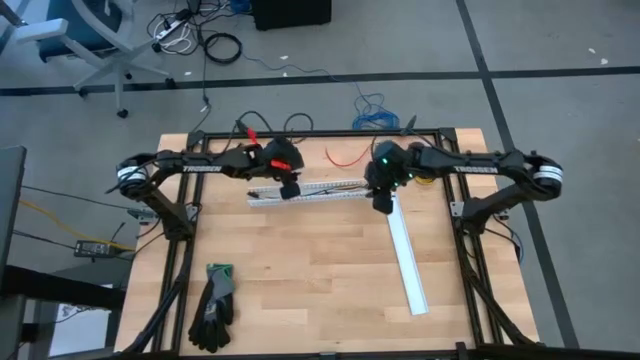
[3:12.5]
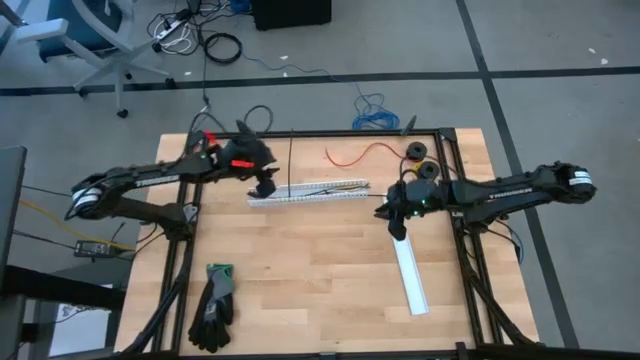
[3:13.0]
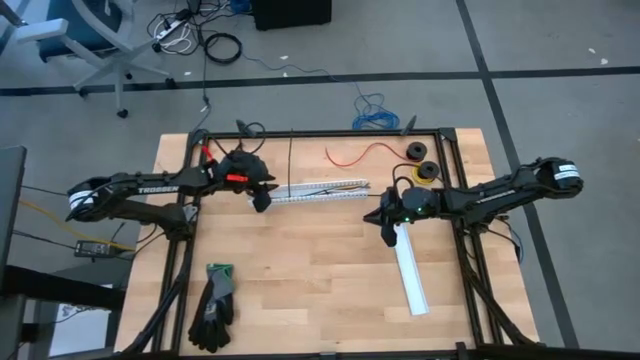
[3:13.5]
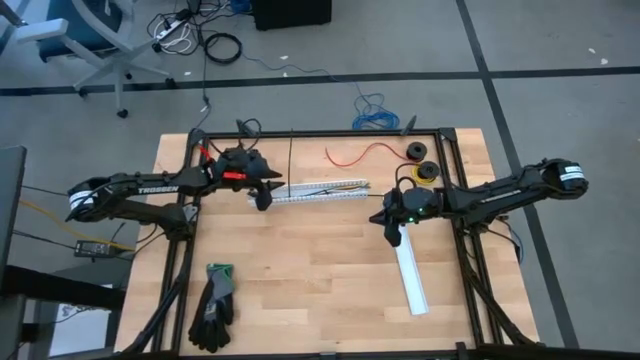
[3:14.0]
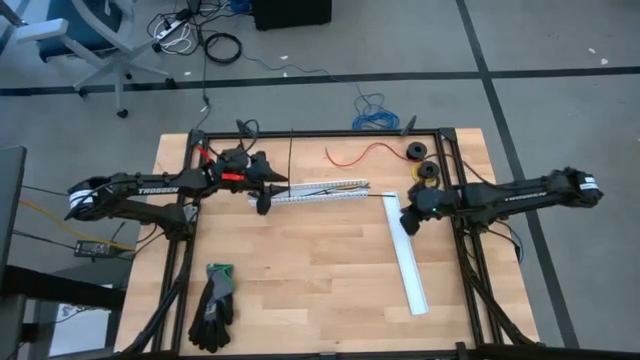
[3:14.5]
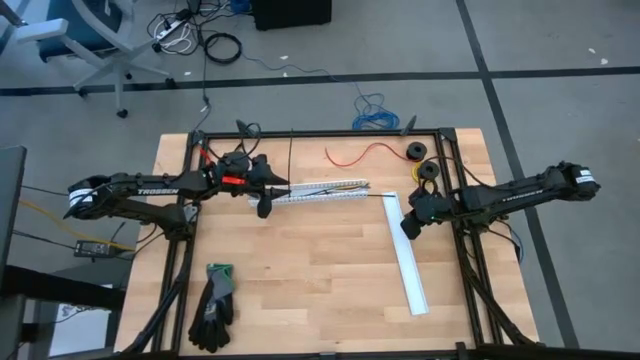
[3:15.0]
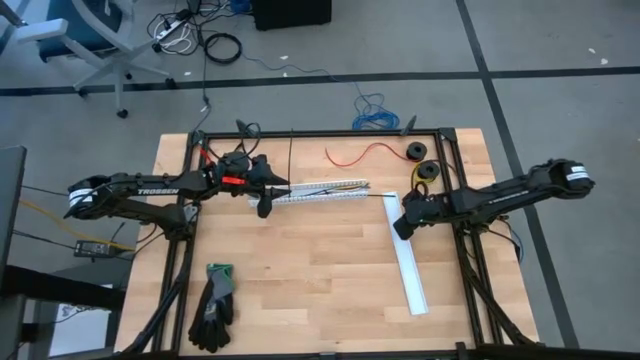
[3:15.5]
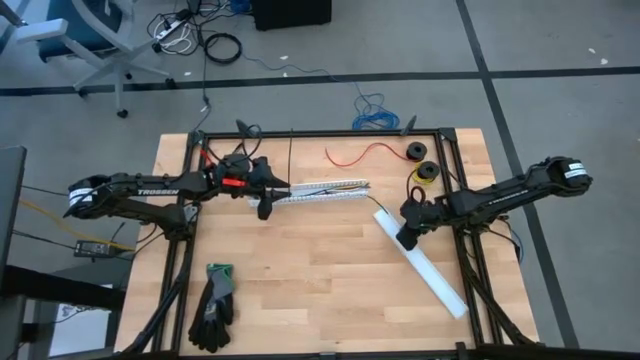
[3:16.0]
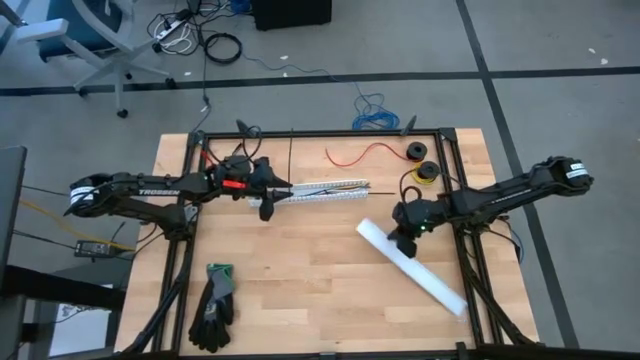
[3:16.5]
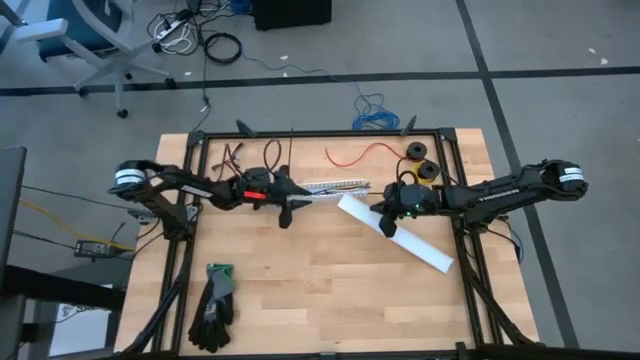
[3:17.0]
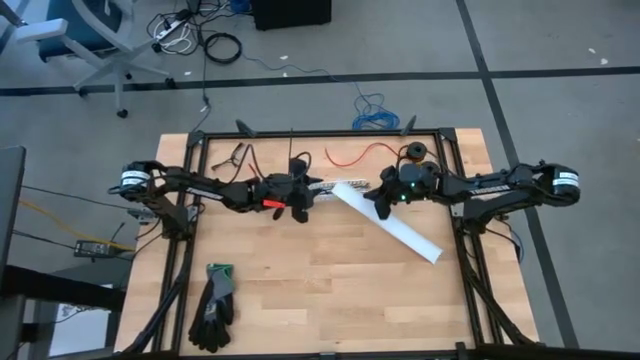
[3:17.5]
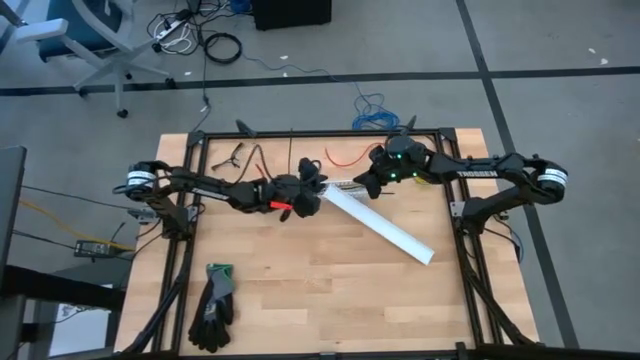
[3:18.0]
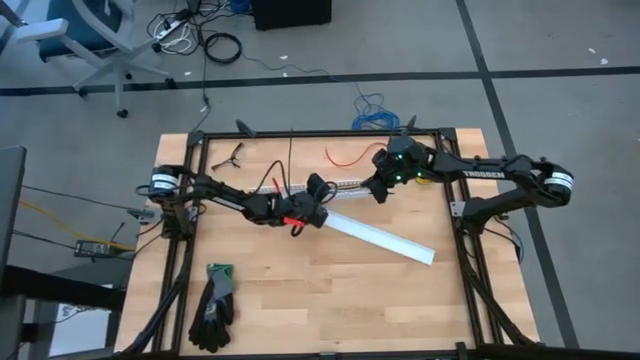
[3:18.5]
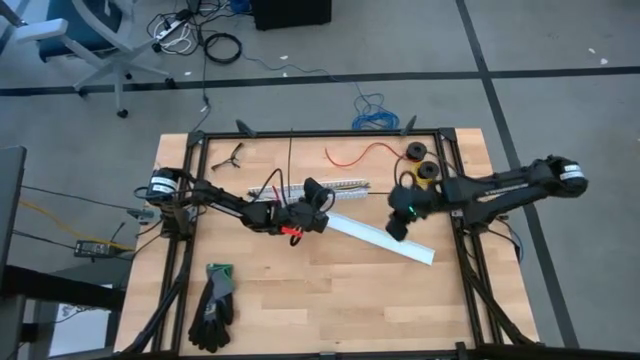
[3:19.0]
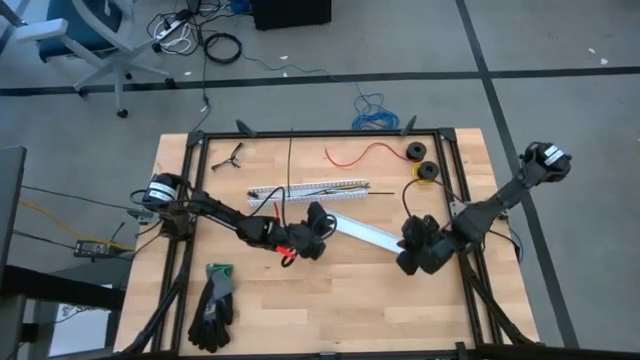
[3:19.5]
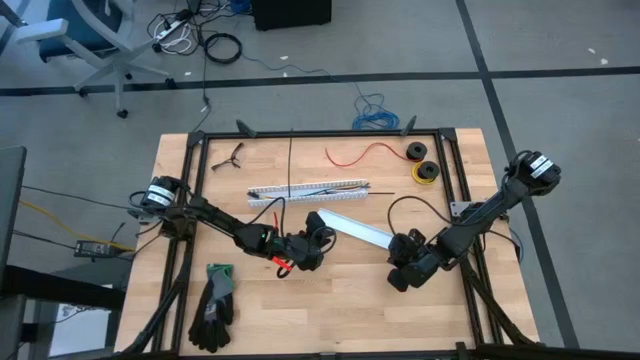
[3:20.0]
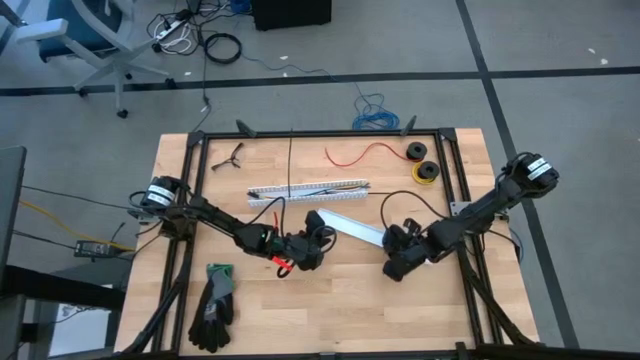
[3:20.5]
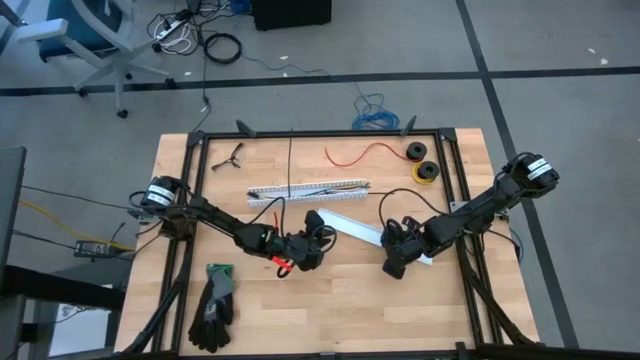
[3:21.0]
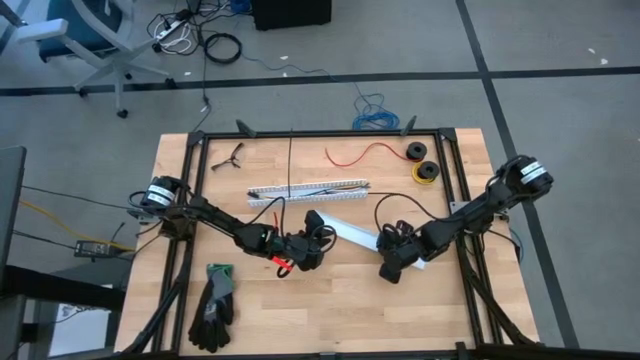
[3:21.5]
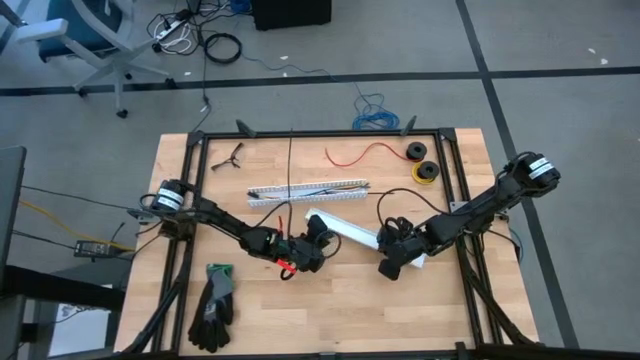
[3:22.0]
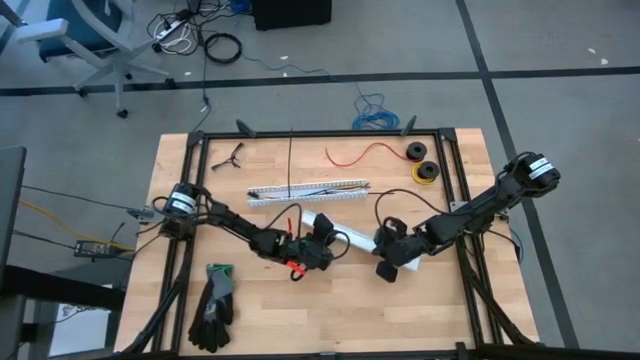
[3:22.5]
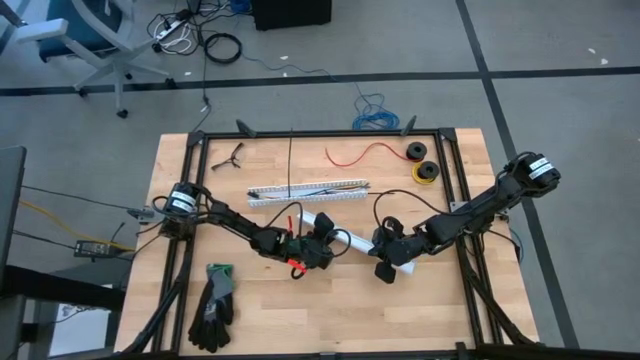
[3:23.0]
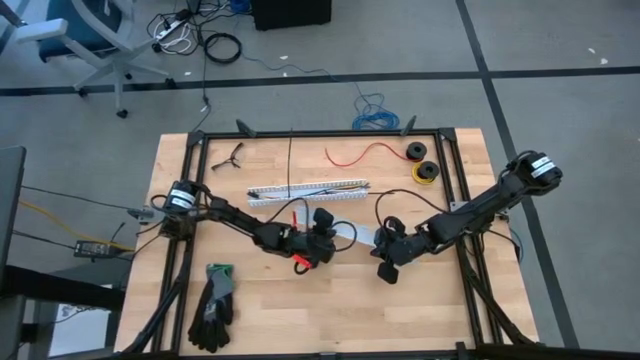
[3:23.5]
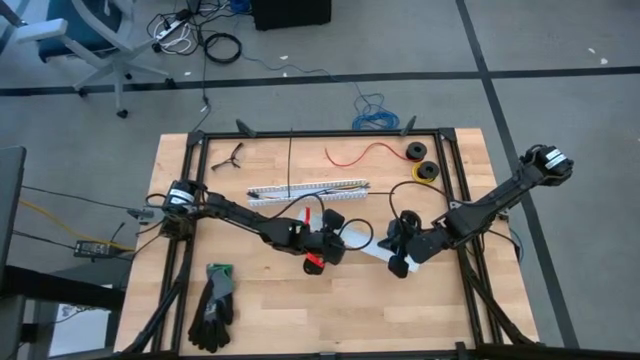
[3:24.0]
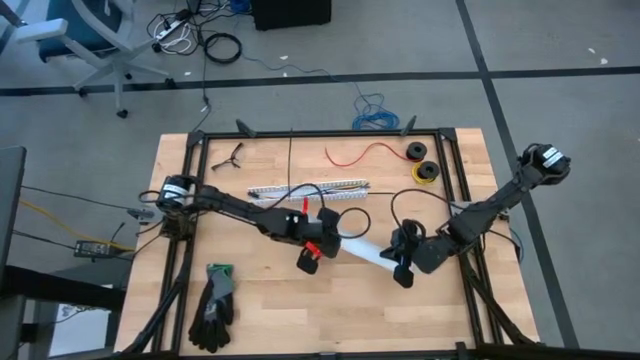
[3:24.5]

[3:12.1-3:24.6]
Task: Ziptie cables
Close the white cable duct

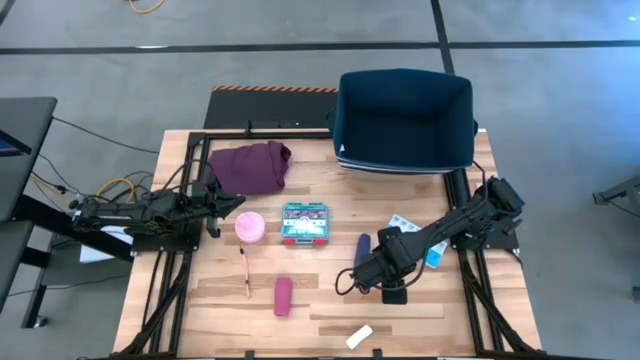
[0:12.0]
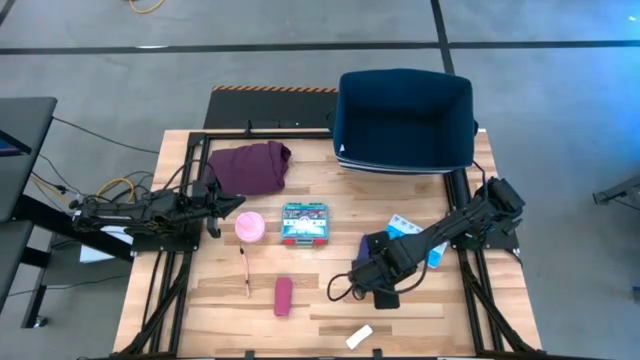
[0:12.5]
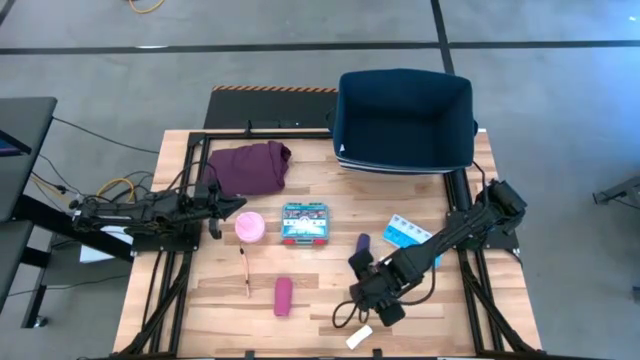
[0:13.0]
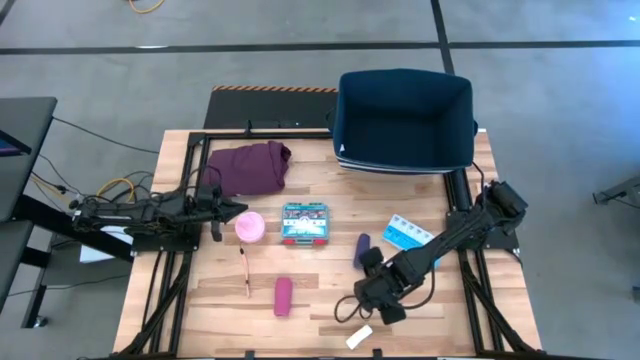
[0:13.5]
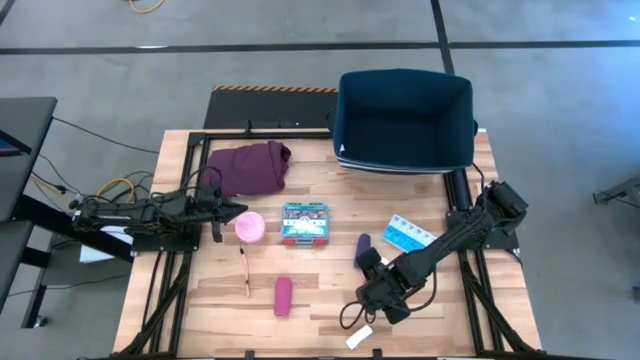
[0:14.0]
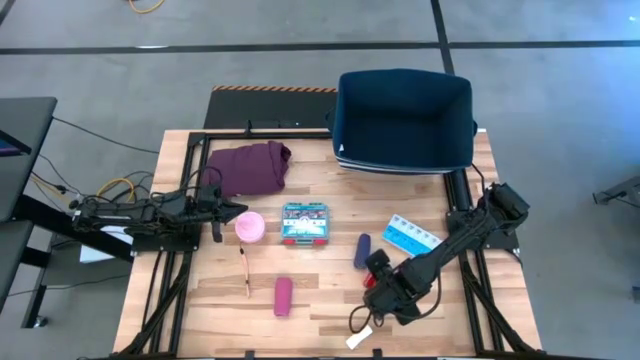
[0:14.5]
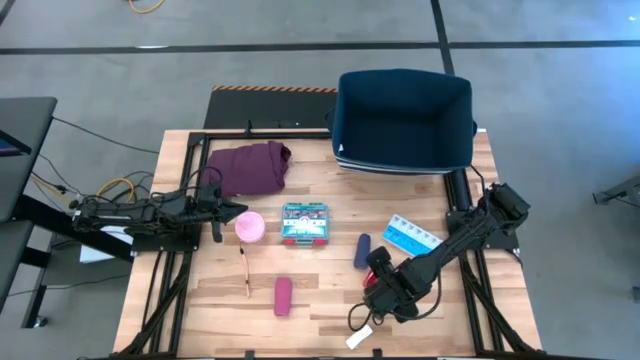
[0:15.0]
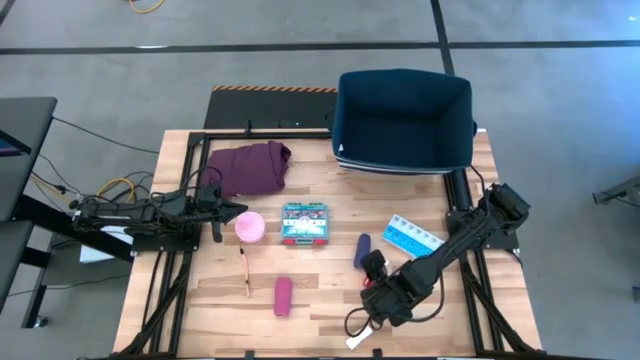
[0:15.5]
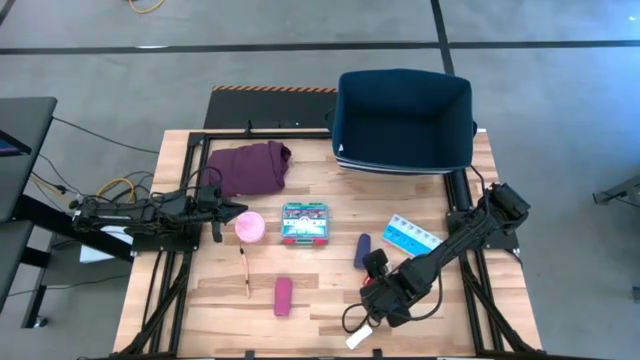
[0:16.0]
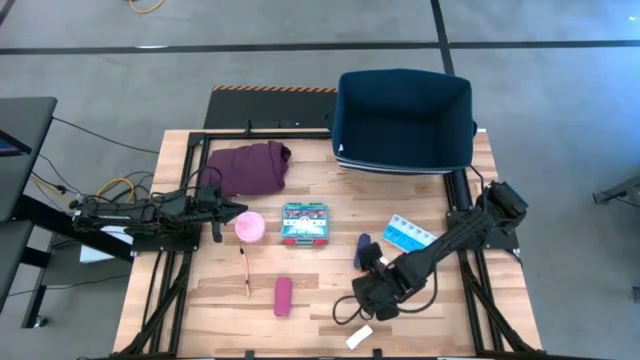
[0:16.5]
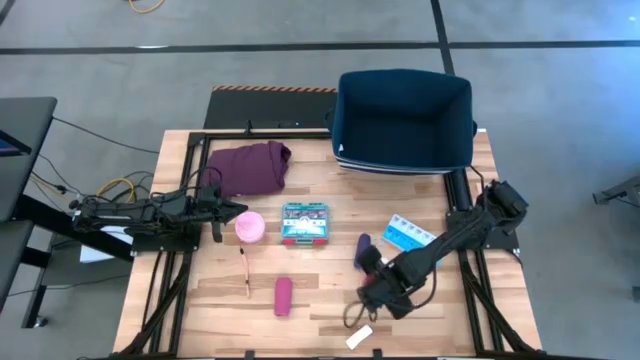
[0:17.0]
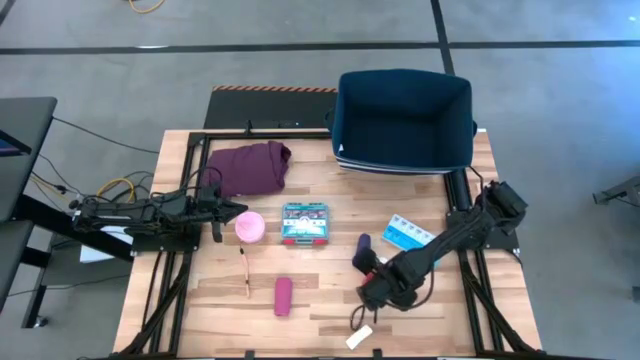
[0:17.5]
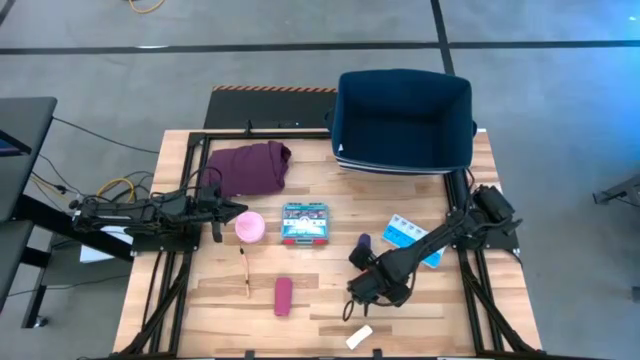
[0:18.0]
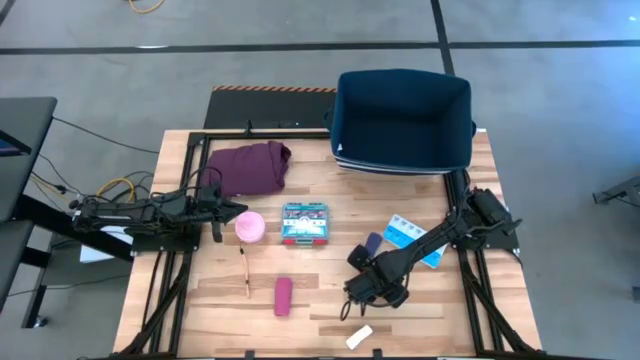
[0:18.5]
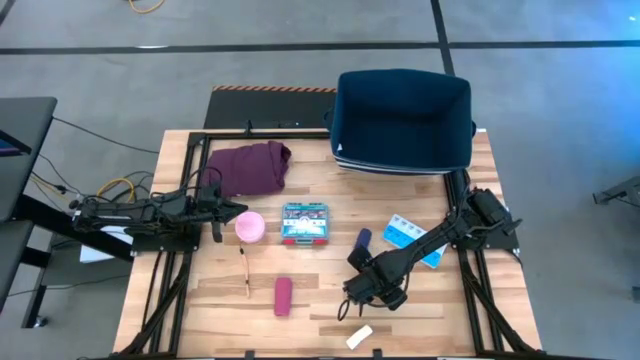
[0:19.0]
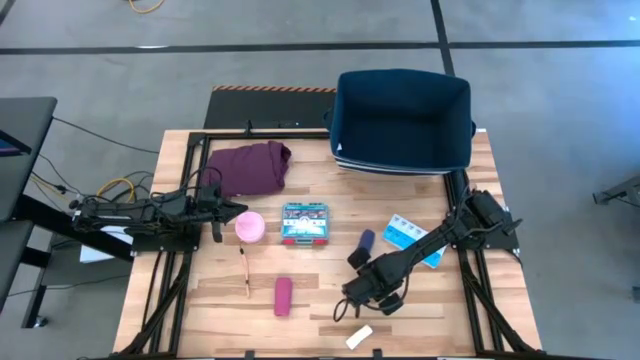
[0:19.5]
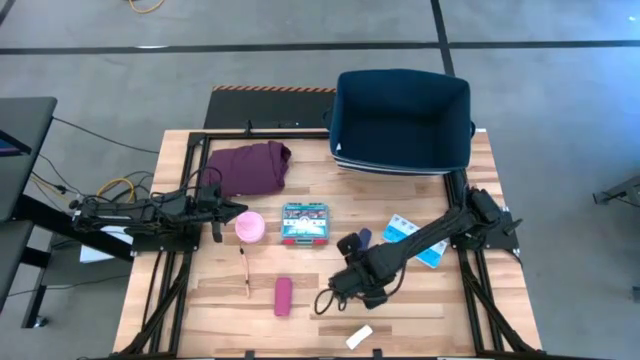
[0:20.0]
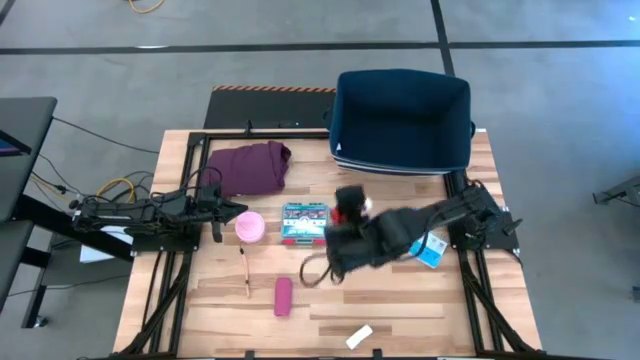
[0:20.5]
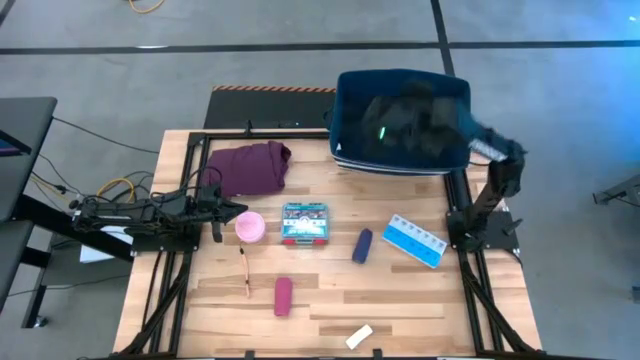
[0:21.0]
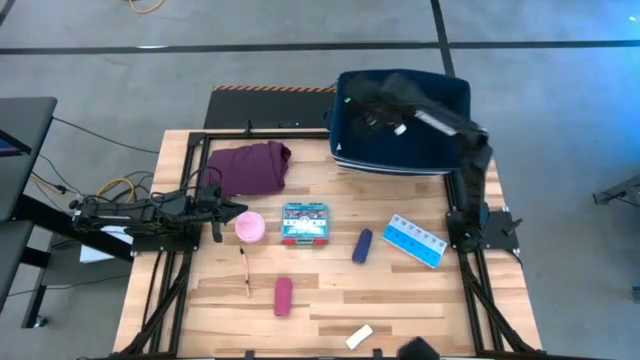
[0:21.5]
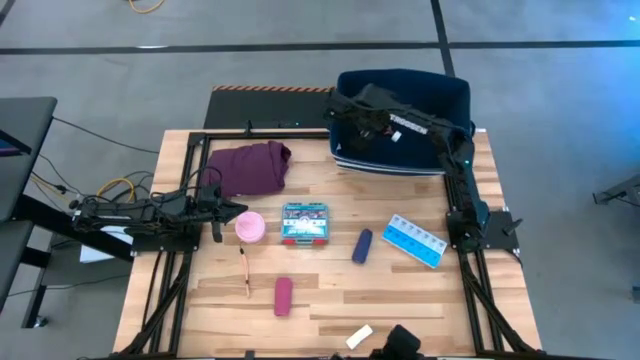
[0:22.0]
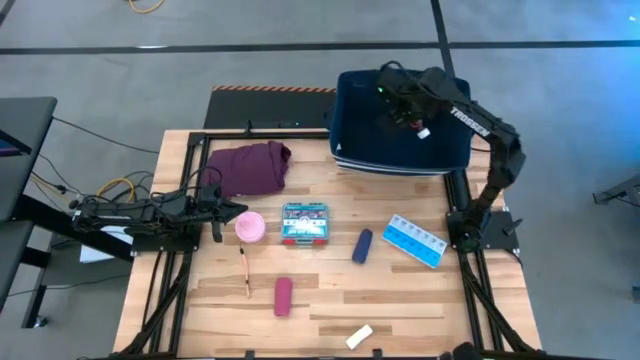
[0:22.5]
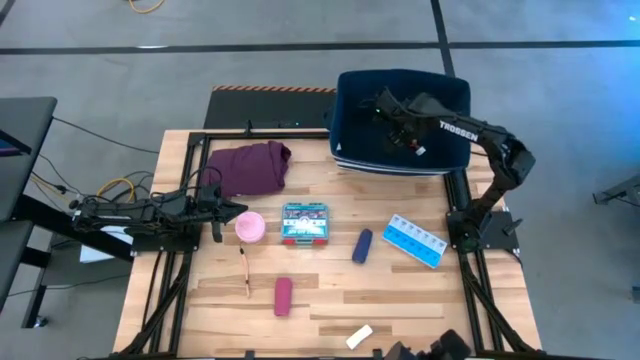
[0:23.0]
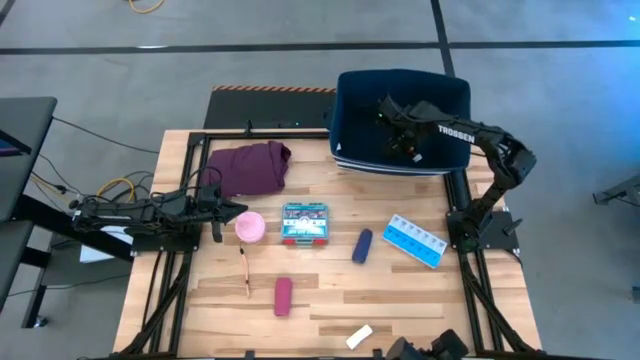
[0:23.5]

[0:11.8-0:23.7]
Task: Pick & place medical supplies in basket/bin
Put the red medicine bottle into the blue bin
